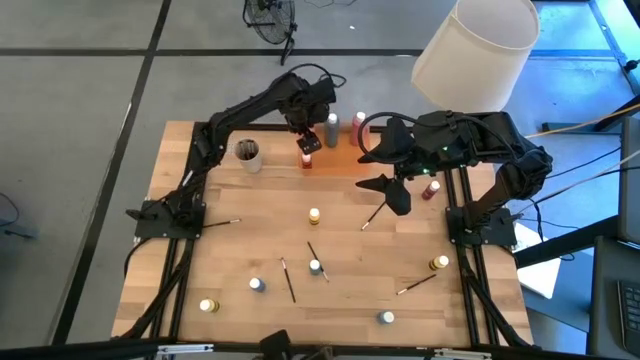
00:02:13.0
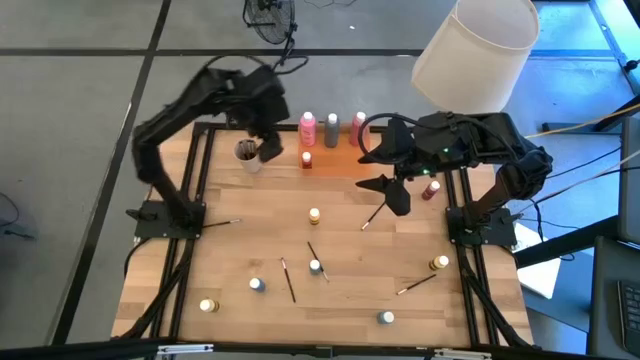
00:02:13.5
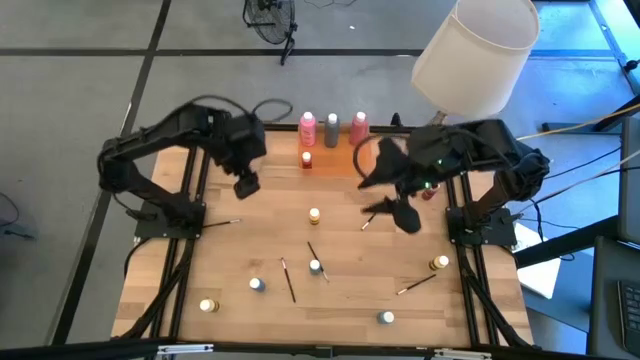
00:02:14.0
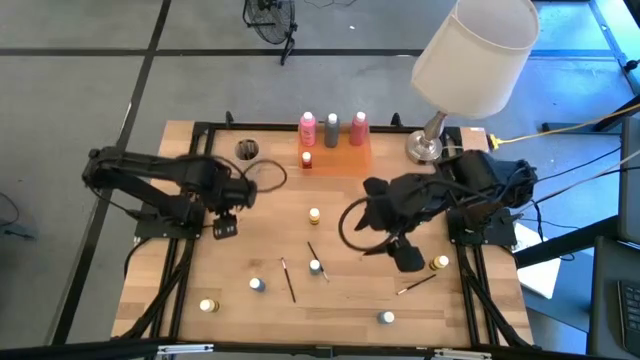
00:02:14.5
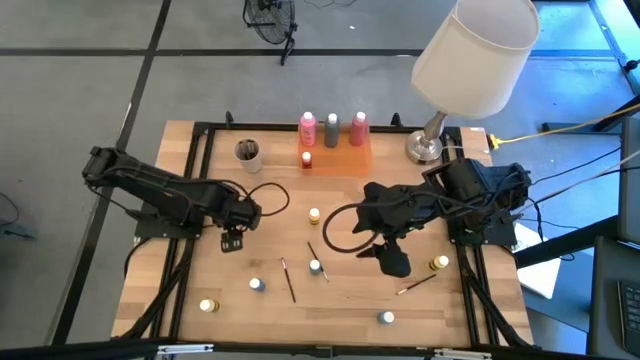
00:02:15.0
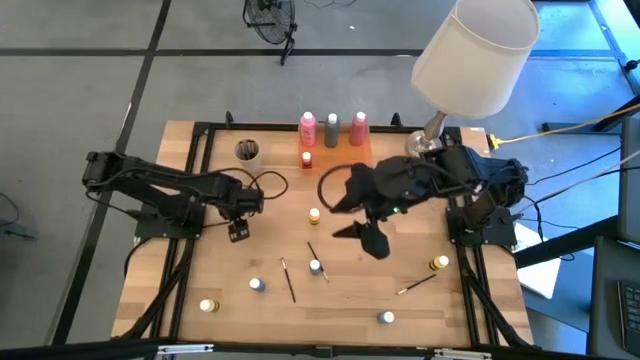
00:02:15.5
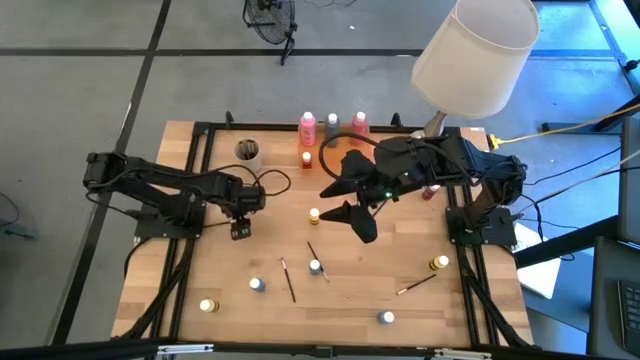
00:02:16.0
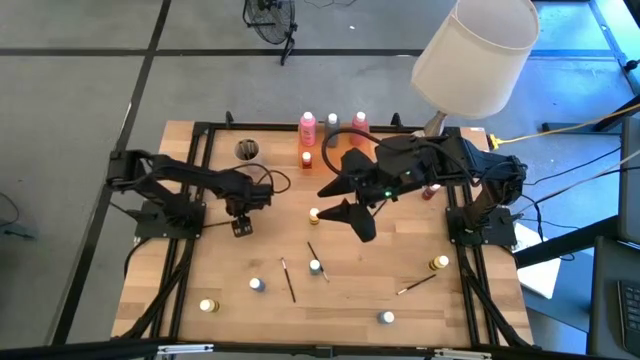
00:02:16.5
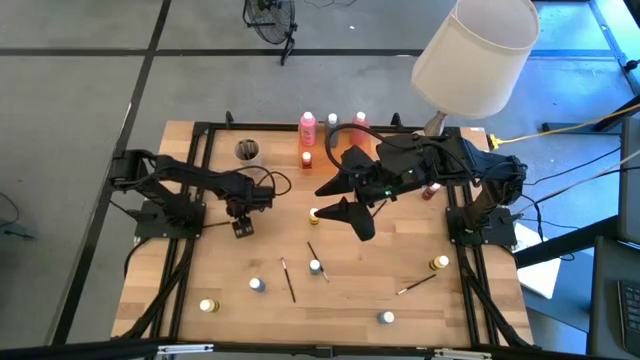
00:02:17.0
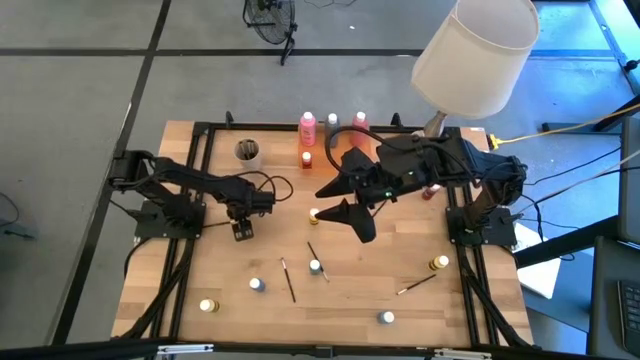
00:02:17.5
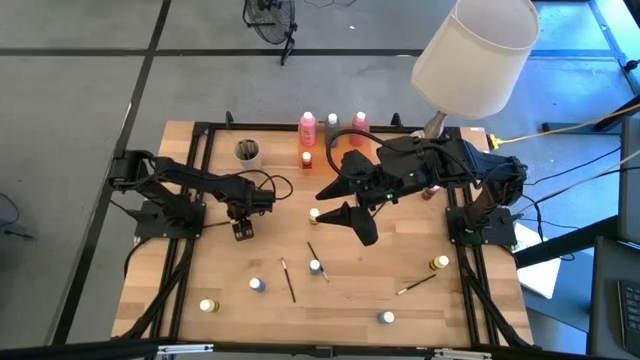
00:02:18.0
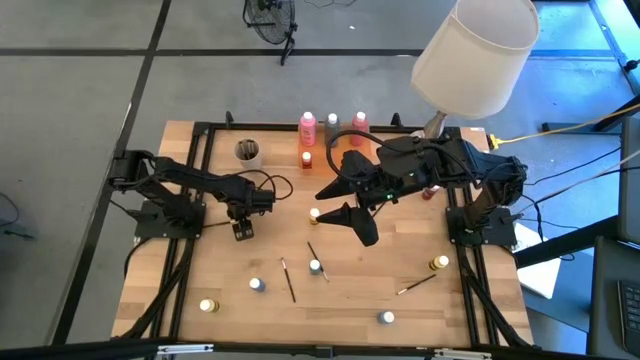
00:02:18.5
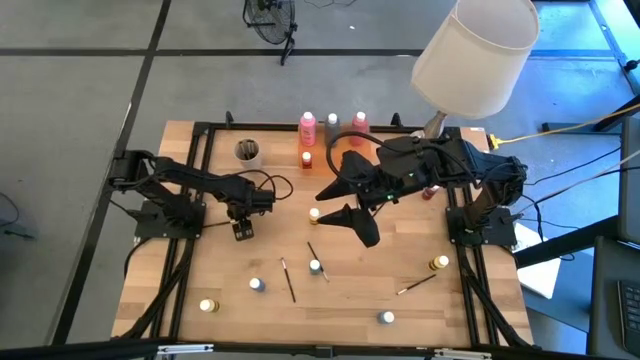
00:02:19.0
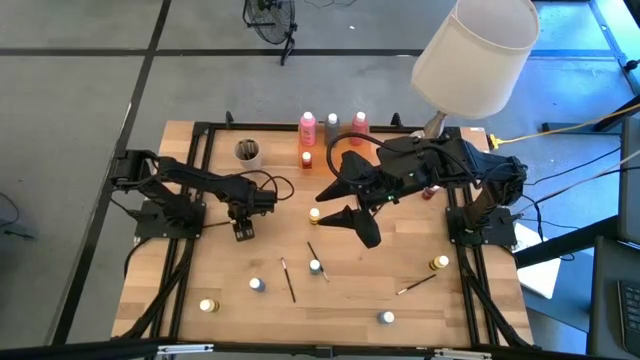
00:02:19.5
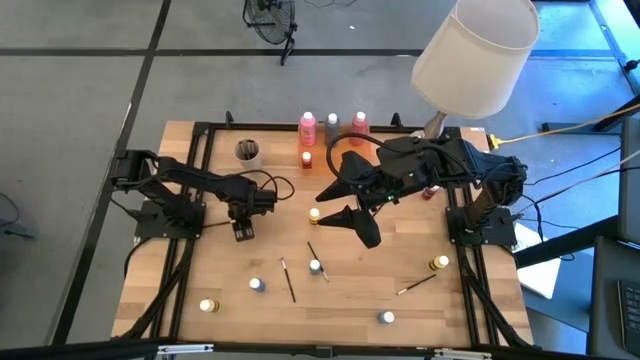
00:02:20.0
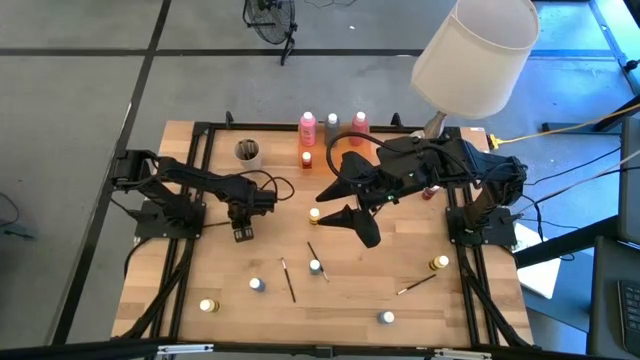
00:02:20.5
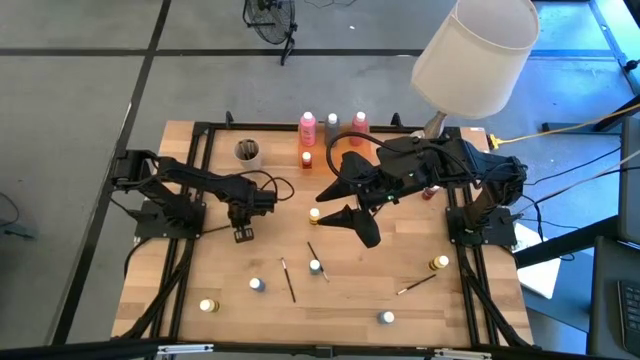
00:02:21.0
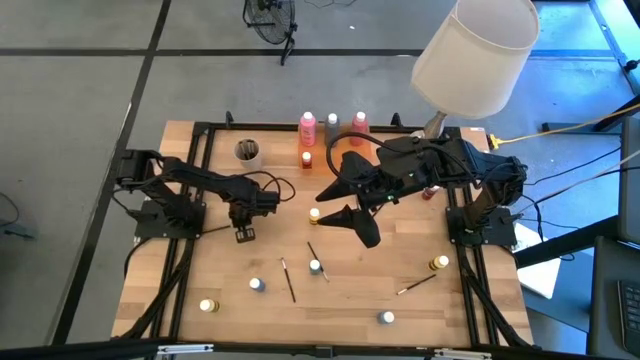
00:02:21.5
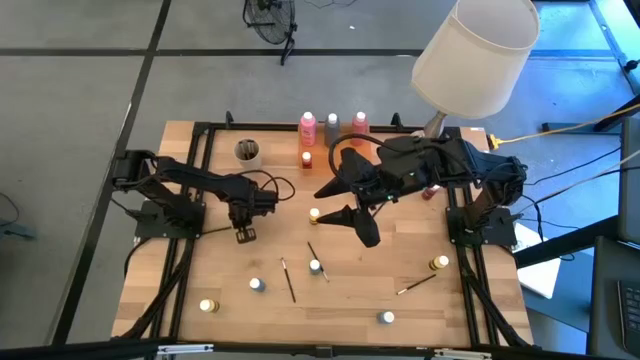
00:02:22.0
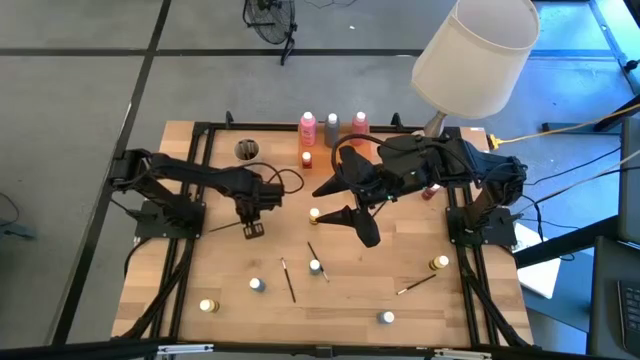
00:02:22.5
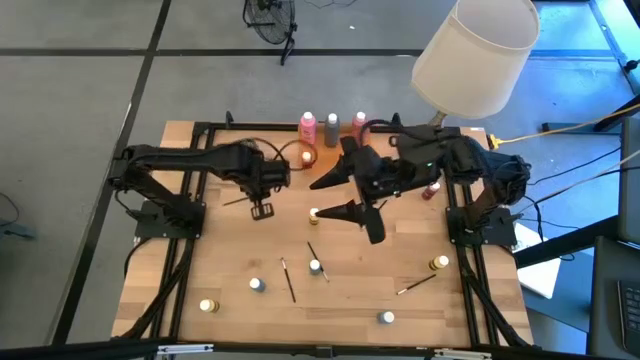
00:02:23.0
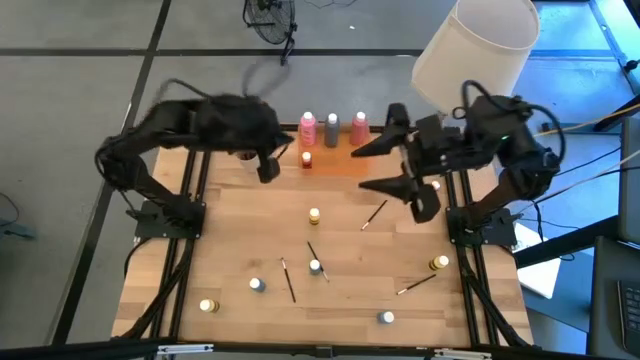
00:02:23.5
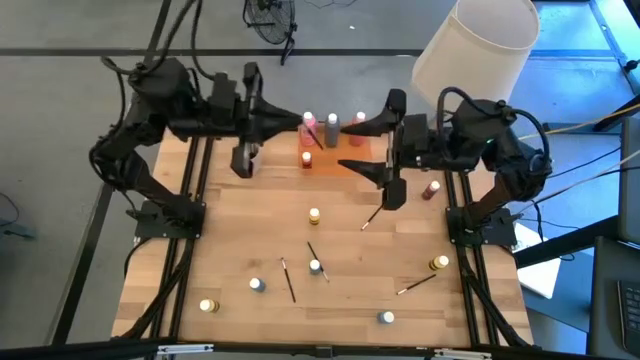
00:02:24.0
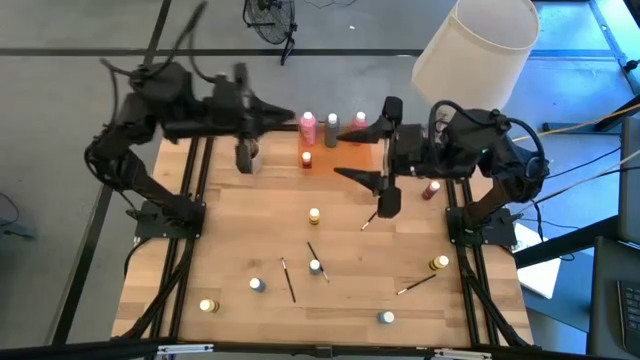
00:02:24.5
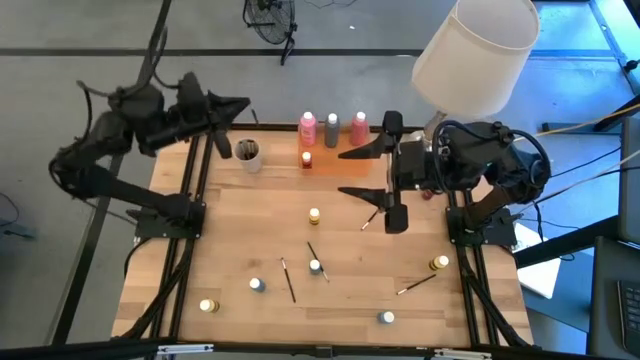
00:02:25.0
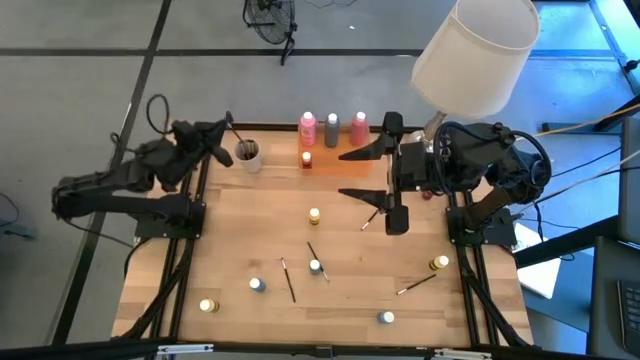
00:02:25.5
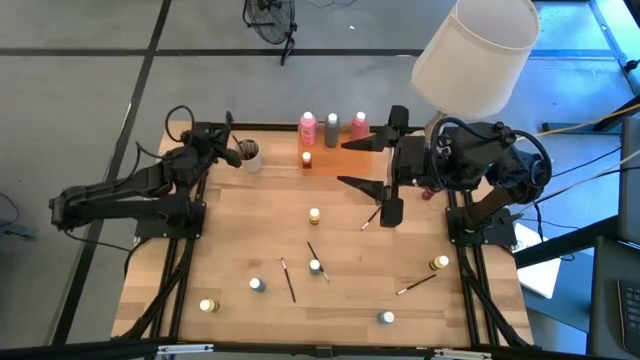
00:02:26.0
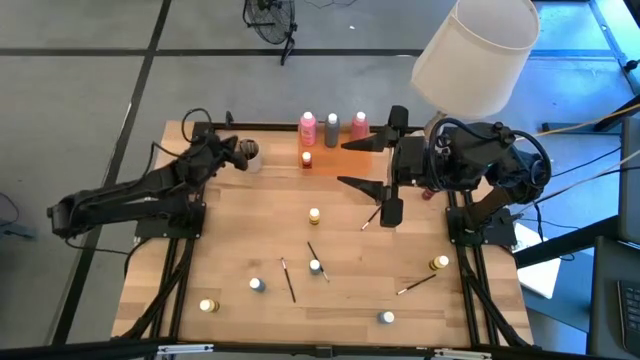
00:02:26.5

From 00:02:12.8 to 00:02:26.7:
Task: Pick & Place Paint Supplies
Put the silver paint brush into the white cup

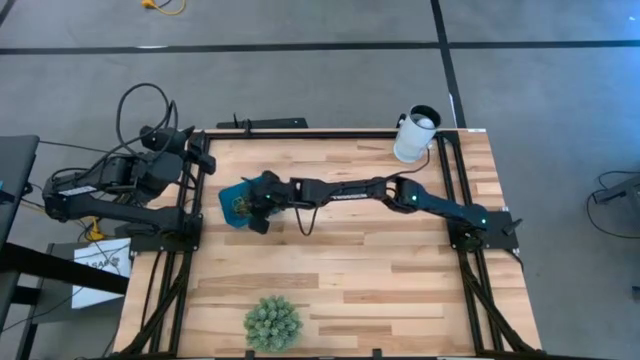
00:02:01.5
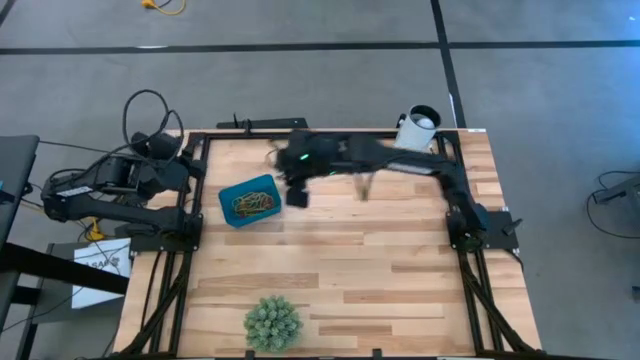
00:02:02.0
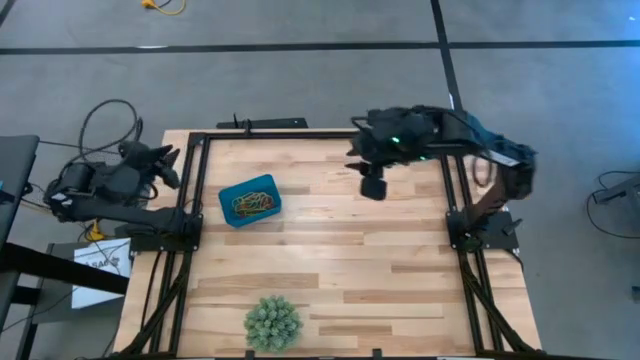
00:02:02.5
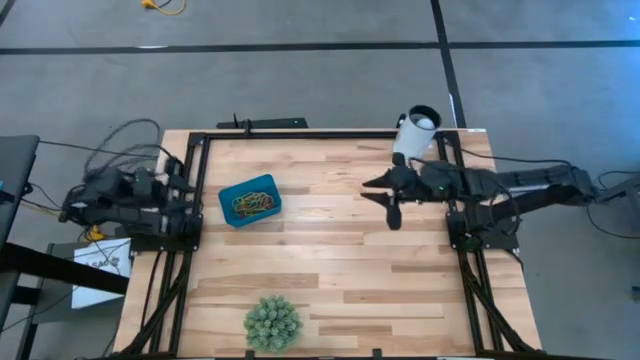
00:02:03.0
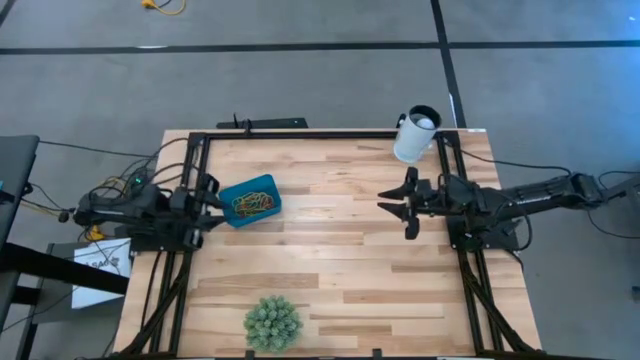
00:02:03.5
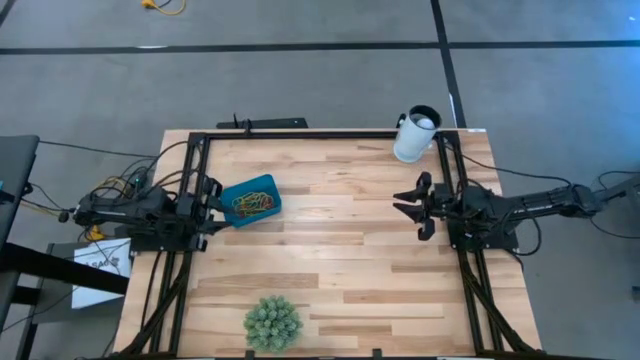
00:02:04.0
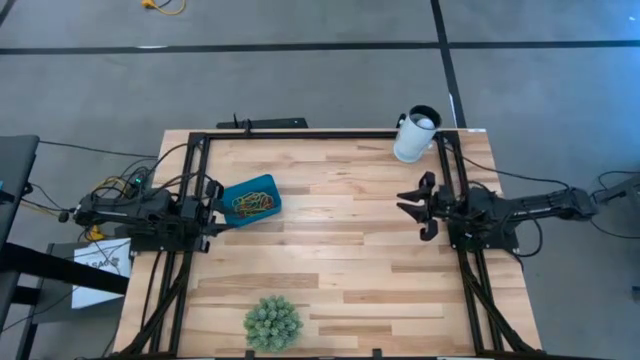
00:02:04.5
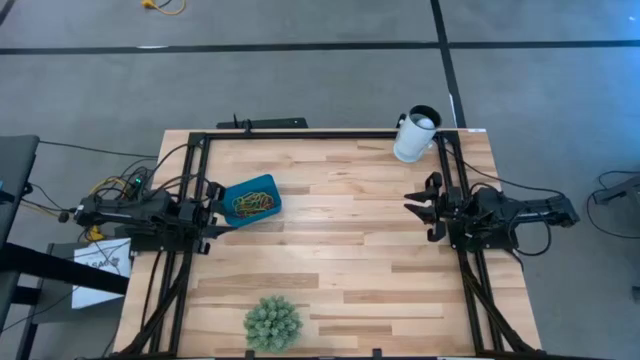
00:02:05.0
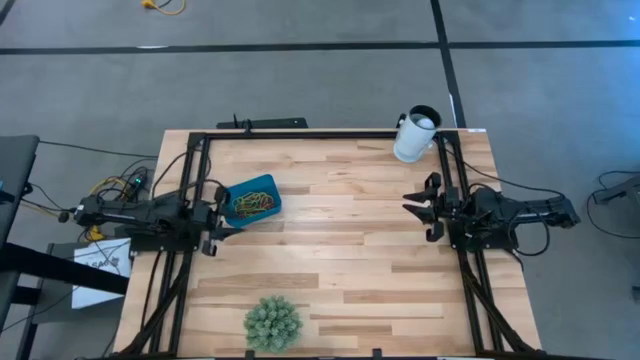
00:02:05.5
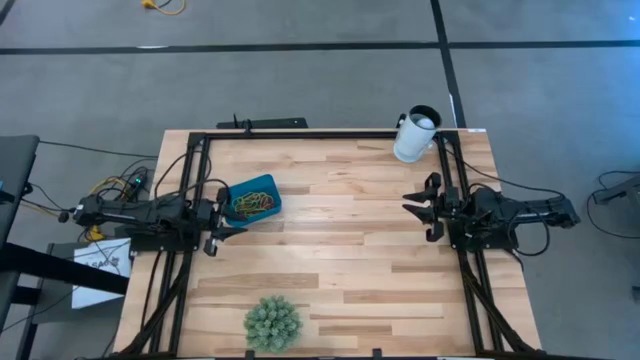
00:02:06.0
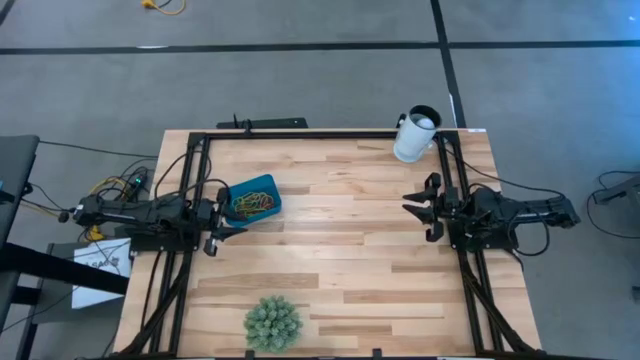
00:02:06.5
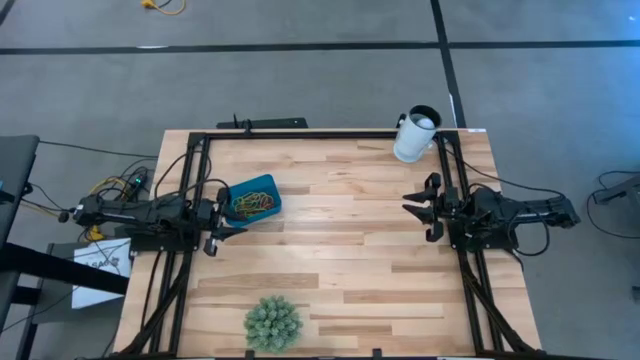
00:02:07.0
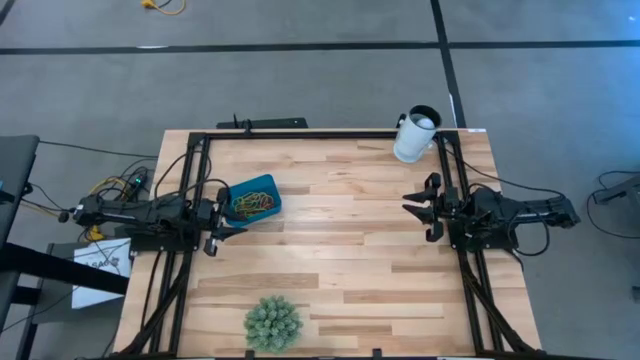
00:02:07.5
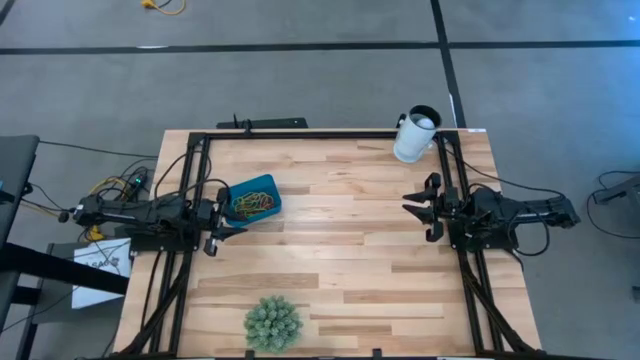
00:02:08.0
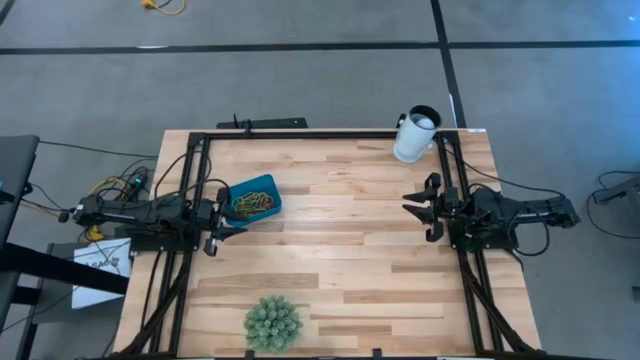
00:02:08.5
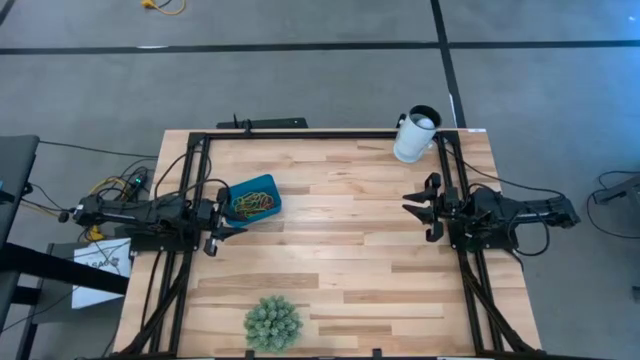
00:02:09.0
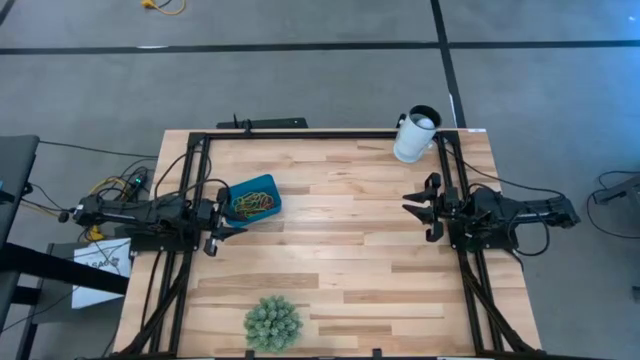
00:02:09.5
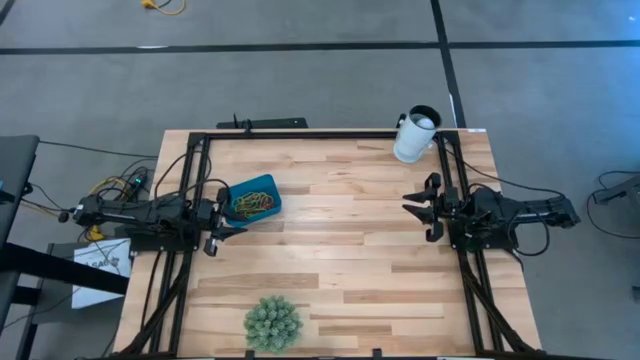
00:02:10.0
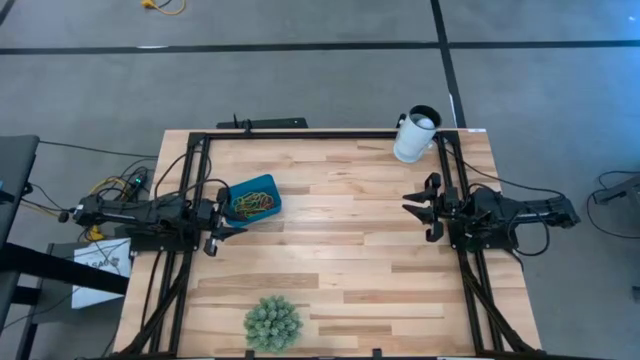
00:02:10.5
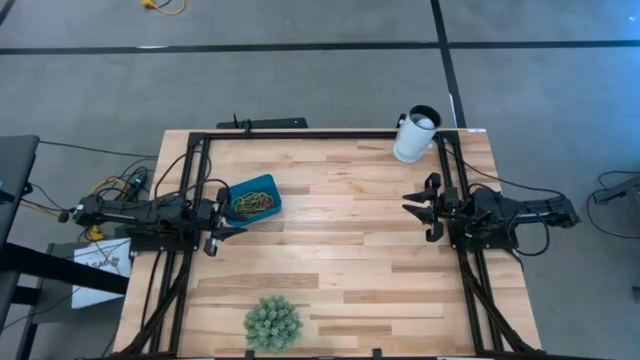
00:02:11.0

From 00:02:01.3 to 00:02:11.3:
Task: Pick and place items into bin
Return to Home Position
